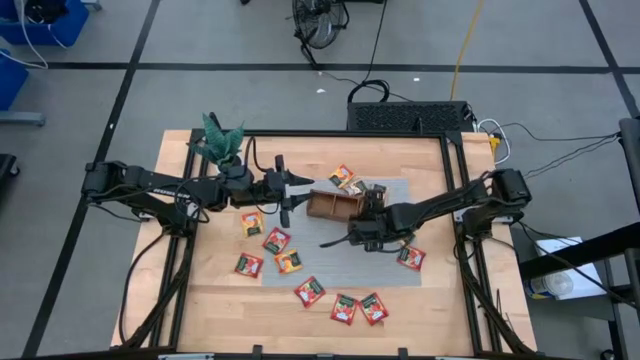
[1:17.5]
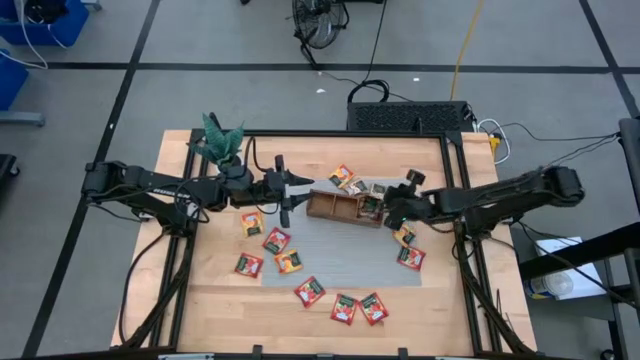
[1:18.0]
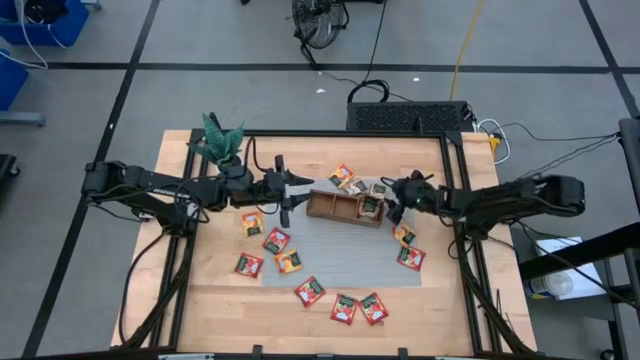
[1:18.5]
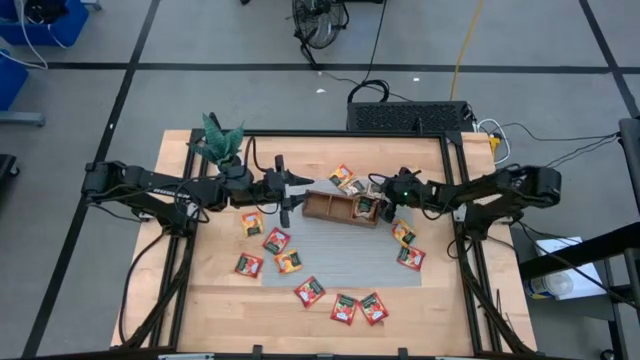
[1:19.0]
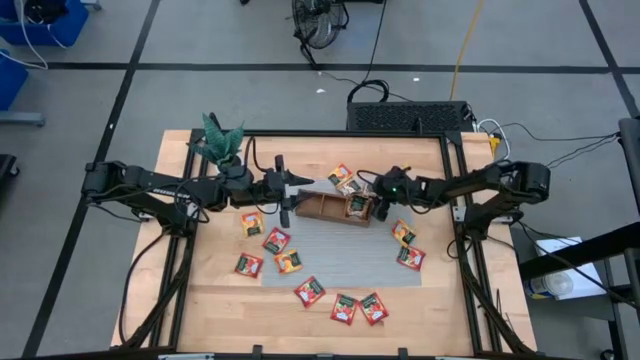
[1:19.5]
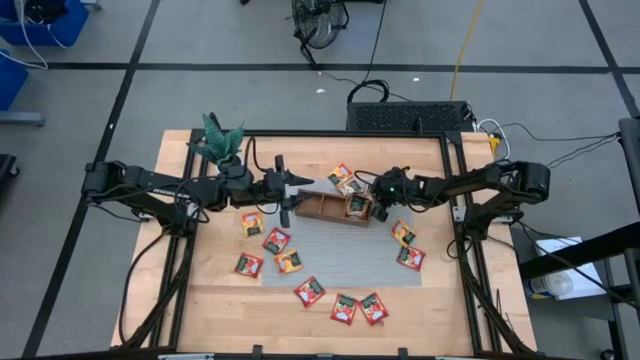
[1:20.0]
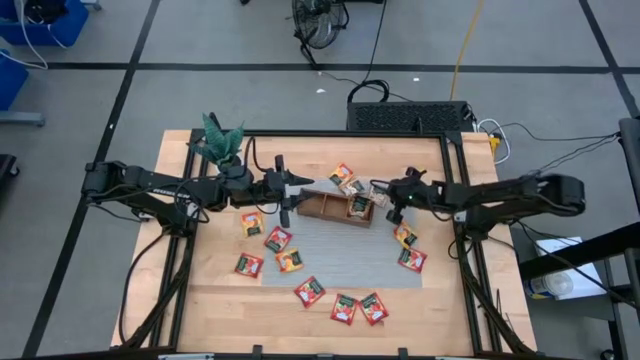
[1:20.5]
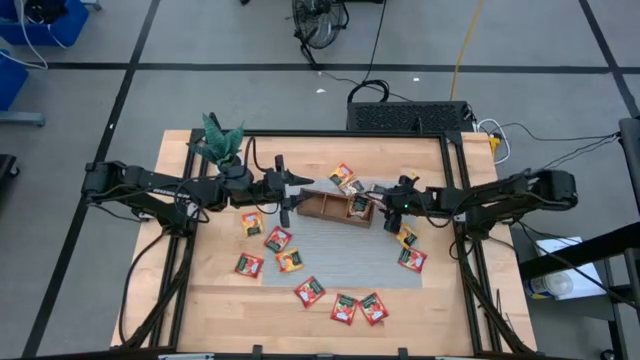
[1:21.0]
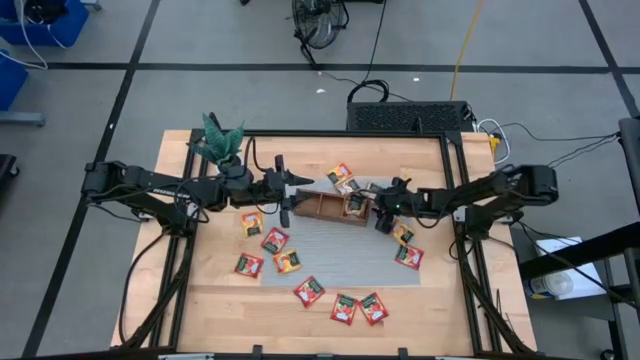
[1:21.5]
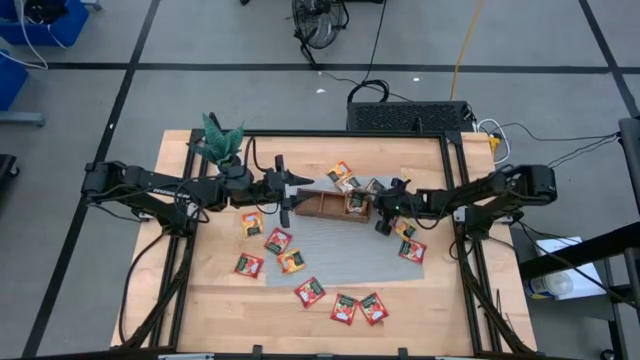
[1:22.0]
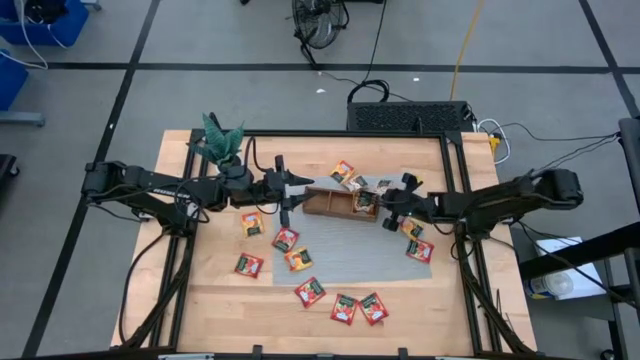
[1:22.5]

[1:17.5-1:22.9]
Task: Pick & Place Tea
Put the top right brown tea into the right part of the wooden organizer

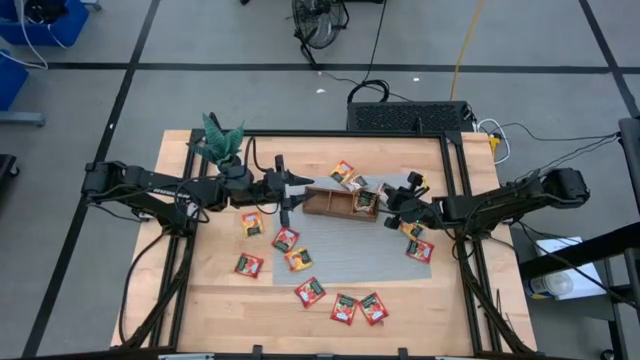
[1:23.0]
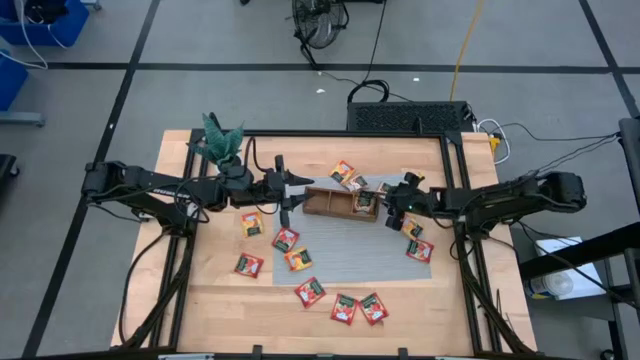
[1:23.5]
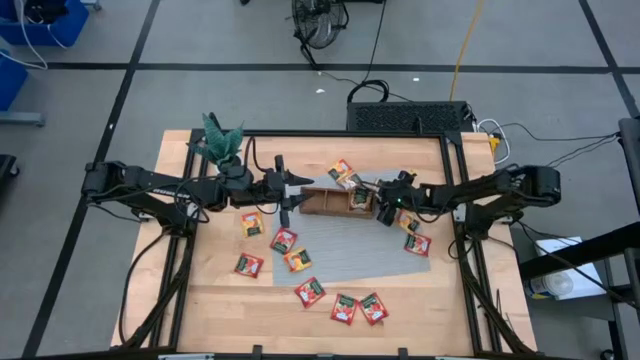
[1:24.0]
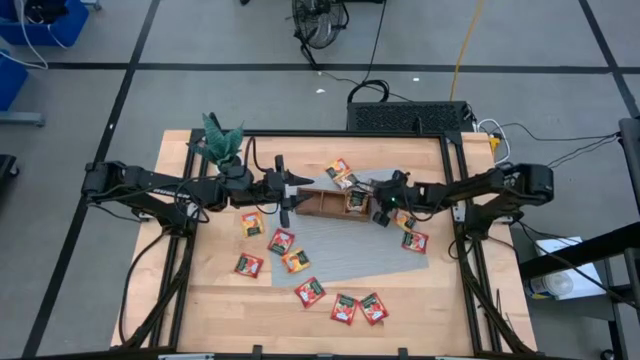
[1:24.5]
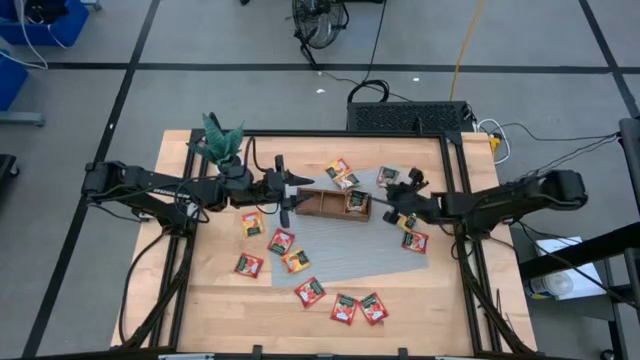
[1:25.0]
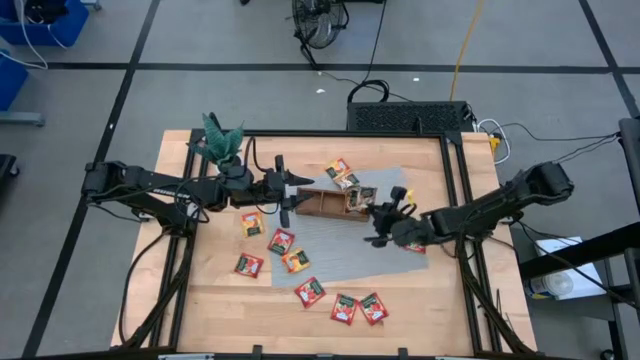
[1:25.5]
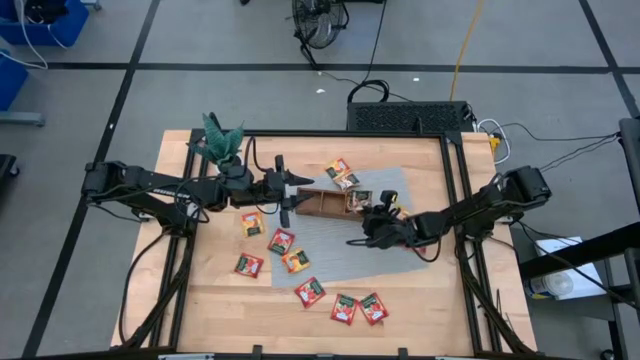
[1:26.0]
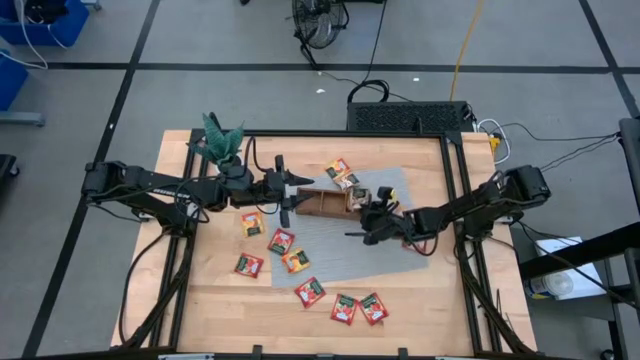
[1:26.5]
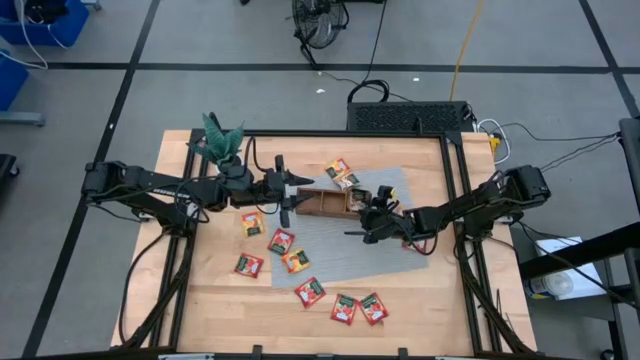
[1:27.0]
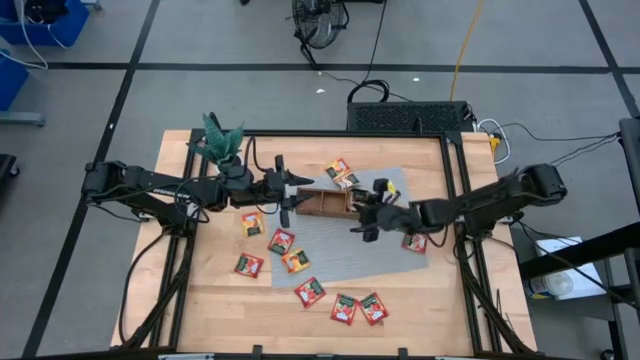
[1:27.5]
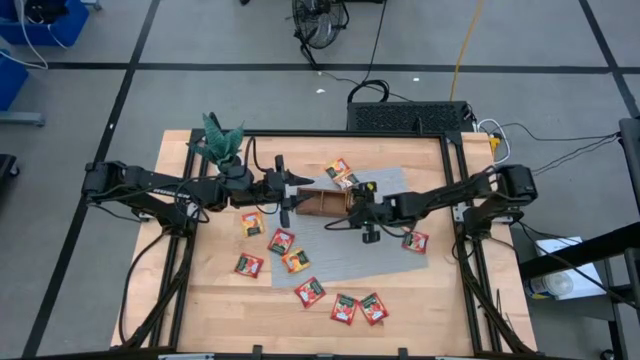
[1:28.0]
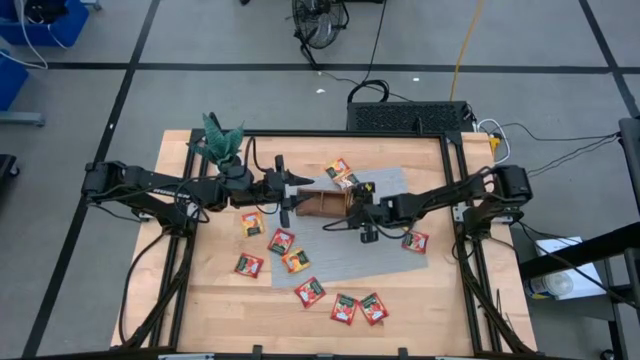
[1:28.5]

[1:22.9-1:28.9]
Put the top right brown tea into the right part of the wooden organizer

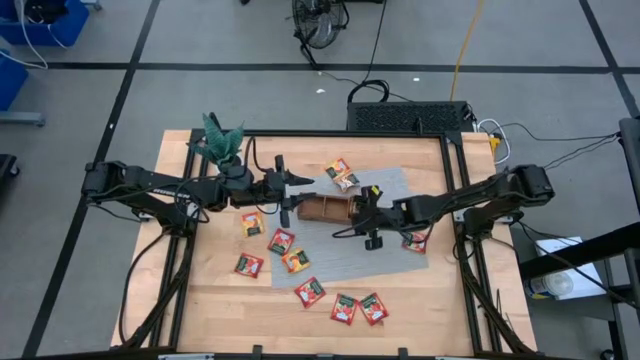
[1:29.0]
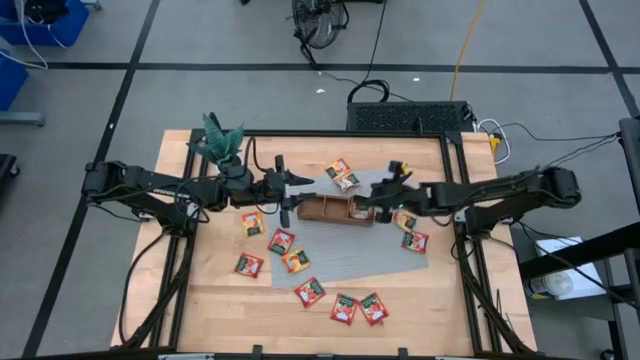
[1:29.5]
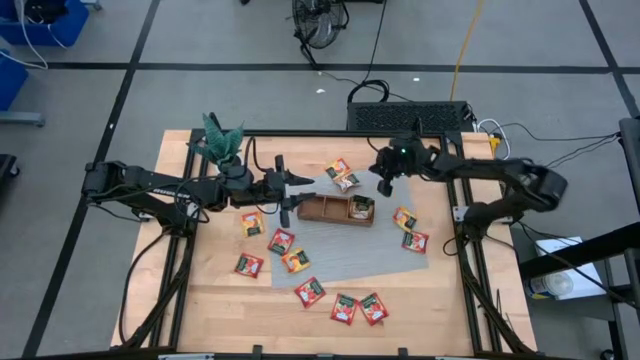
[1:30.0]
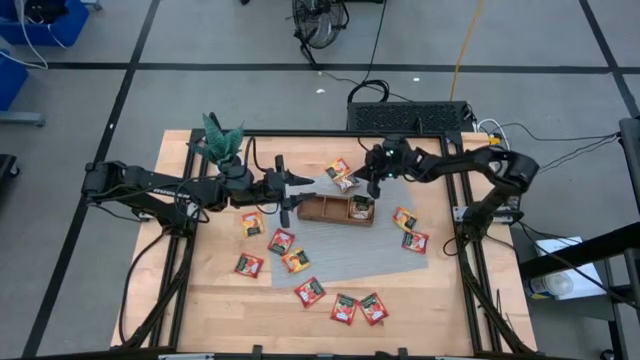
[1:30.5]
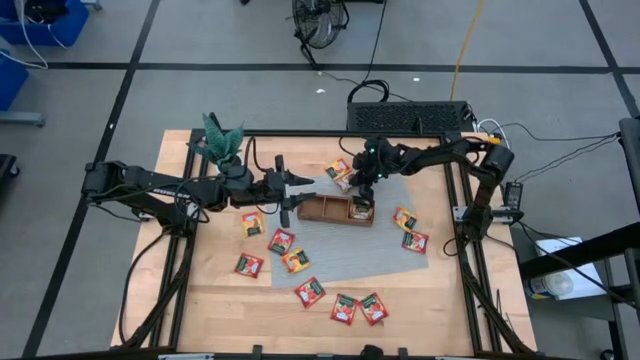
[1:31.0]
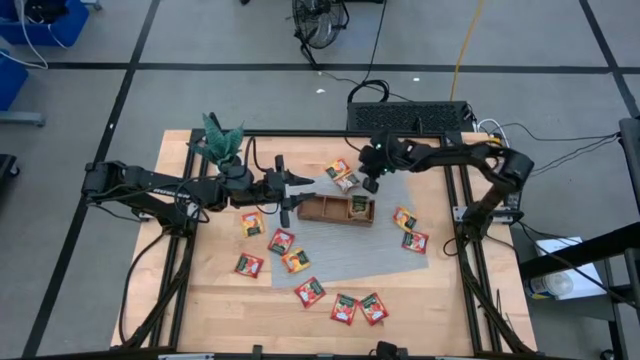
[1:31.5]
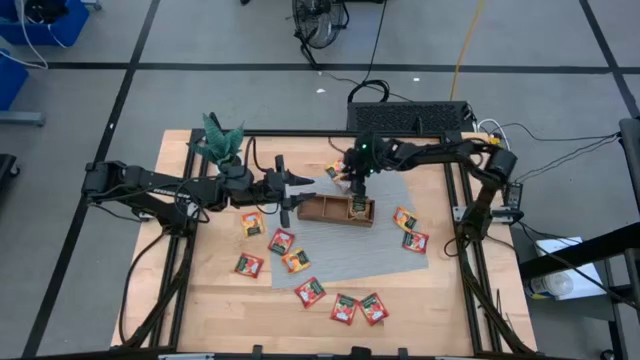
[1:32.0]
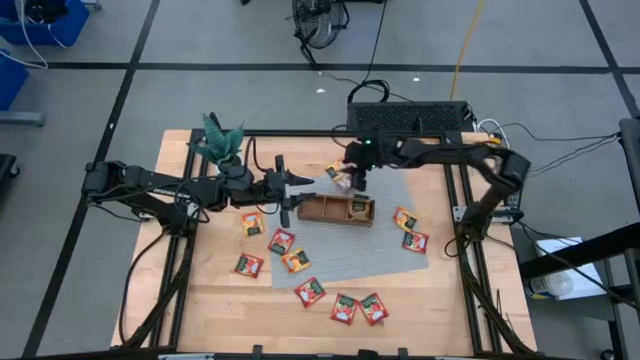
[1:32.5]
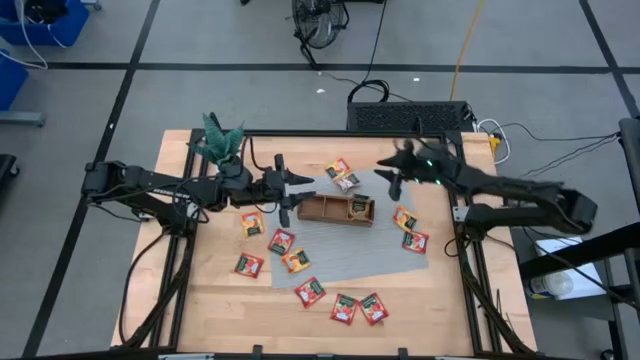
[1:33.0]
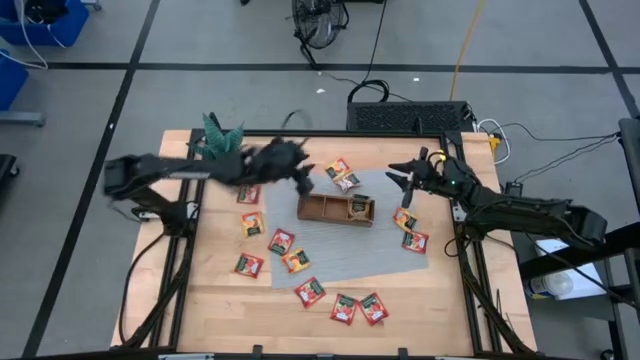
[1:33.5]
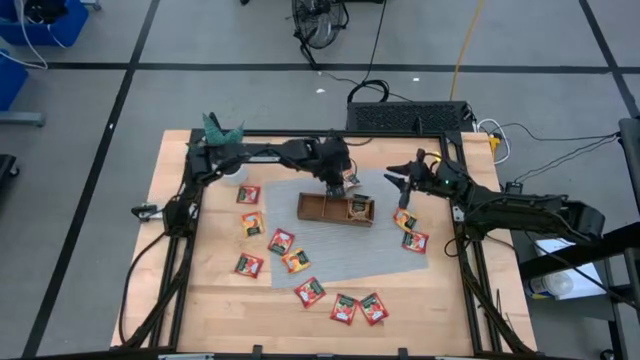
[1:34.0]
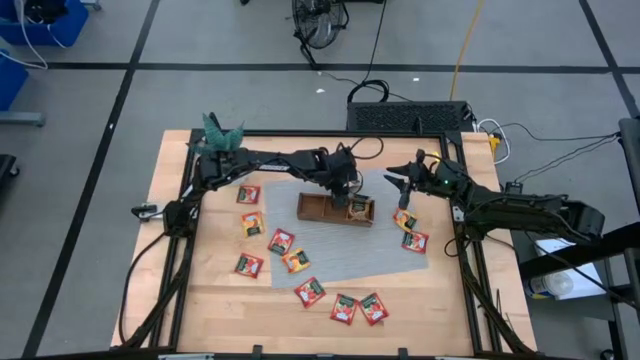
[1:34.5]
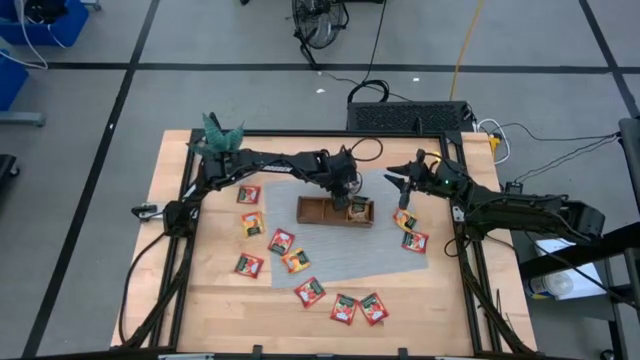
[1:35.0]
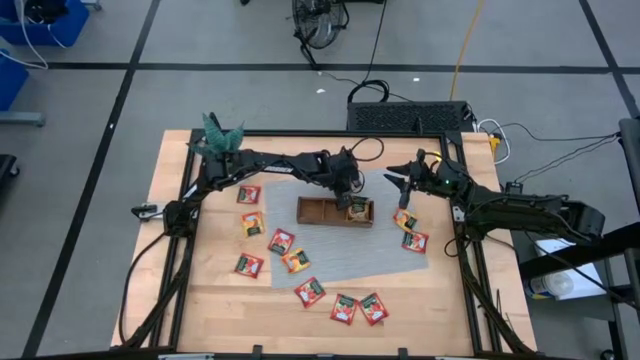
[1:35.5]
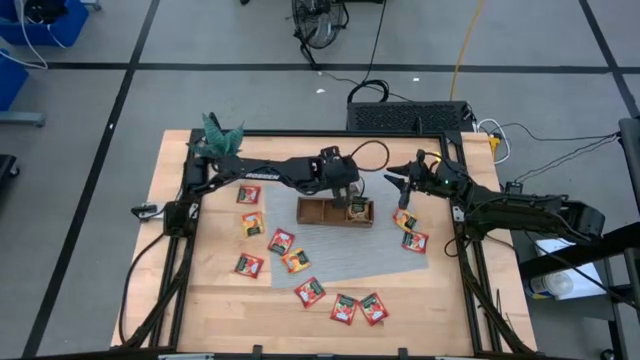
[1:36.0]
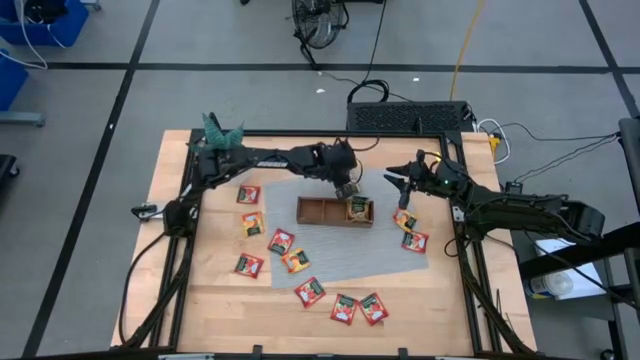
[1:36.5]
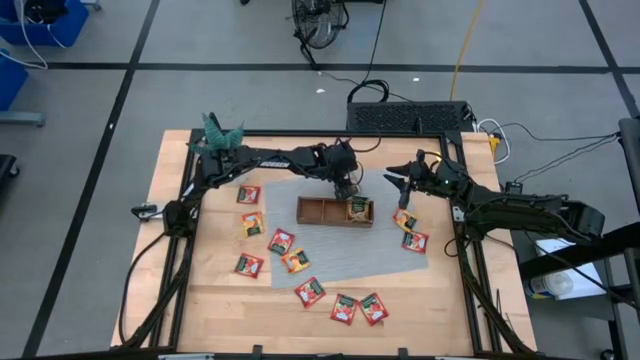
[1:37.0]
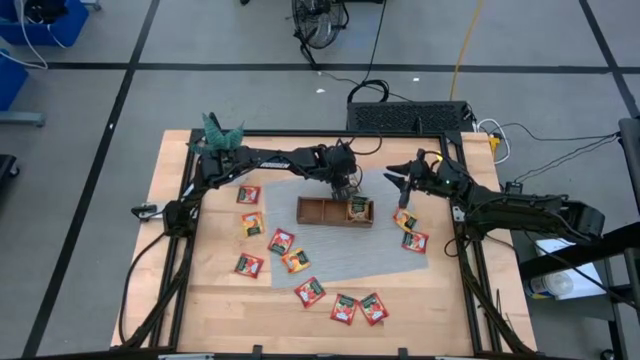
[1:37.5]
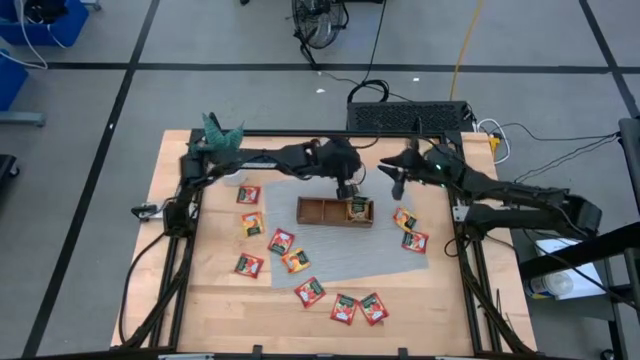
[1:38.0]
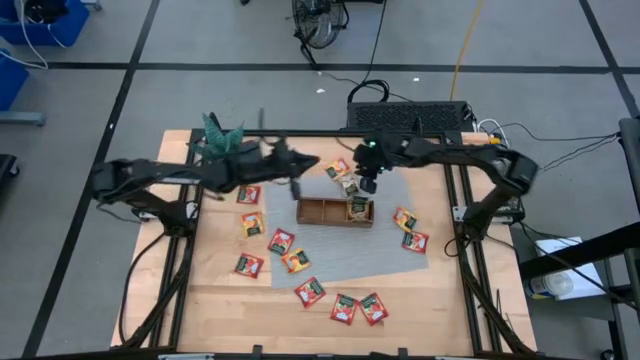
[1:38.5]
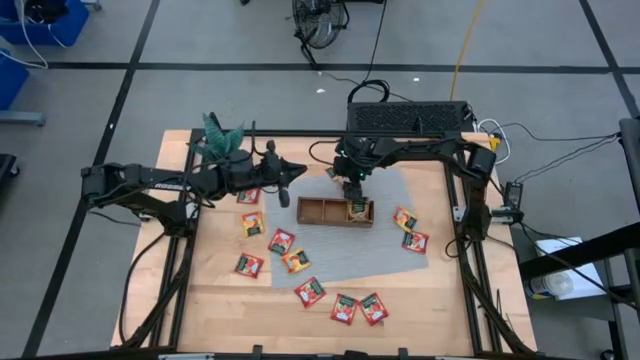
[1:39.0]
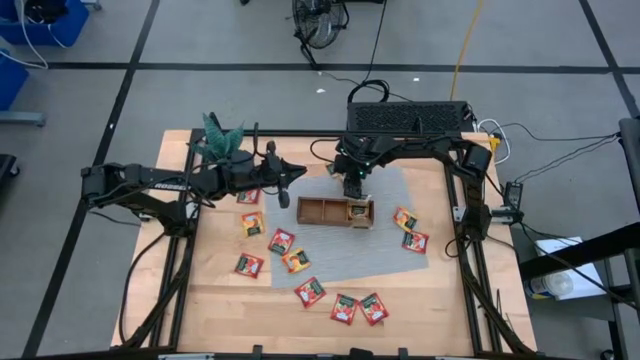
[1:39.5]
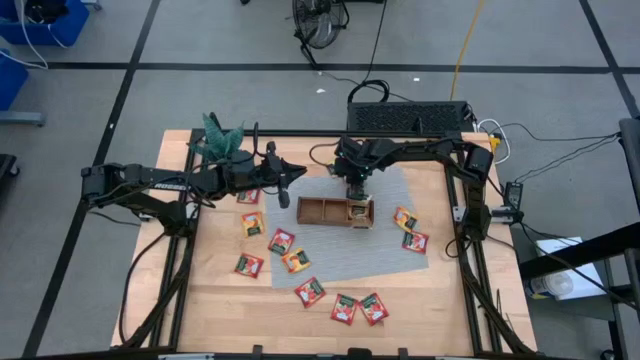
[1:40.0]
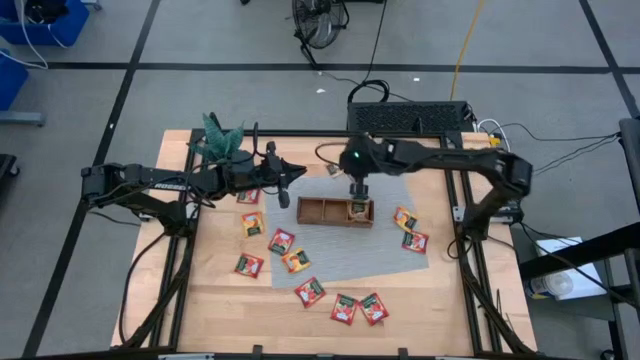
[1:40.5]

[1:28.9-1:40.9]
Put the top brown tea into the right part of the wooden organizer
